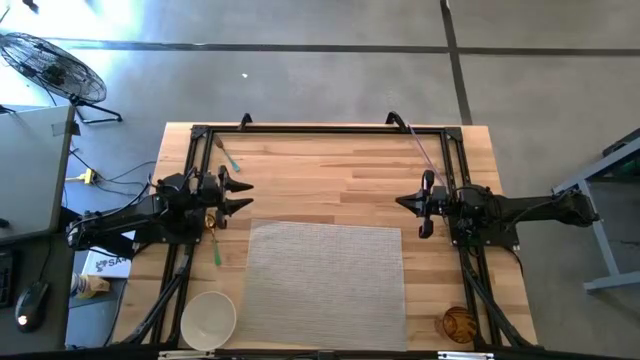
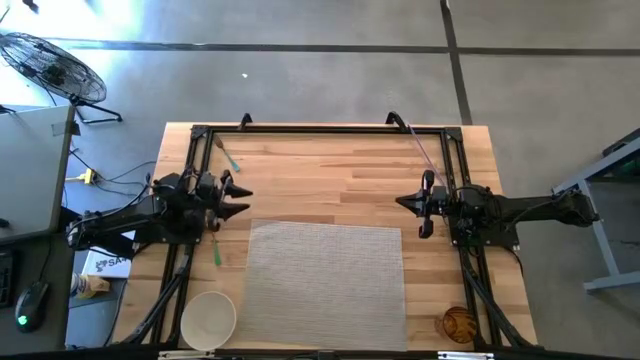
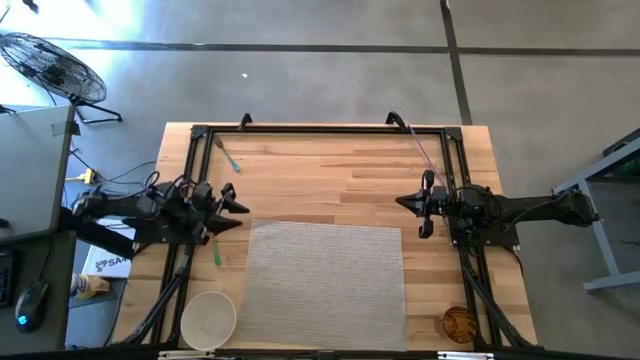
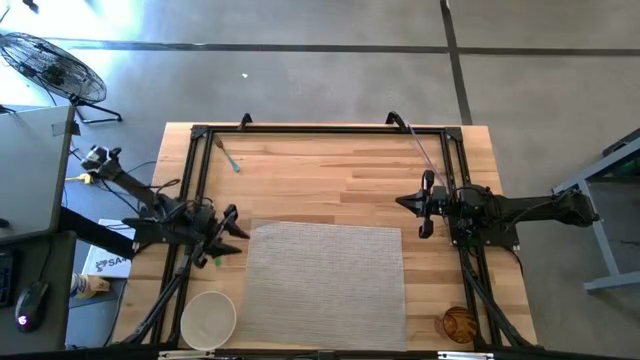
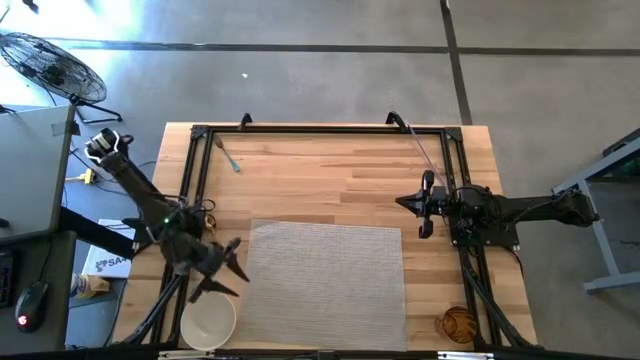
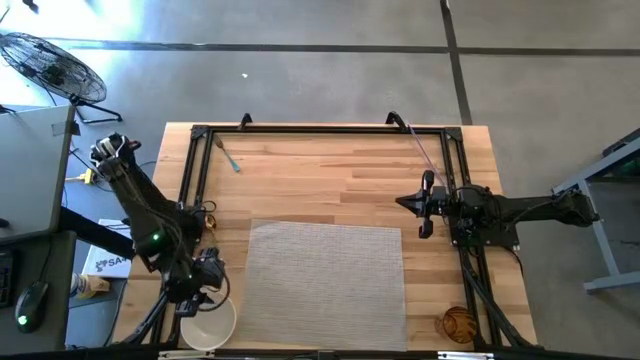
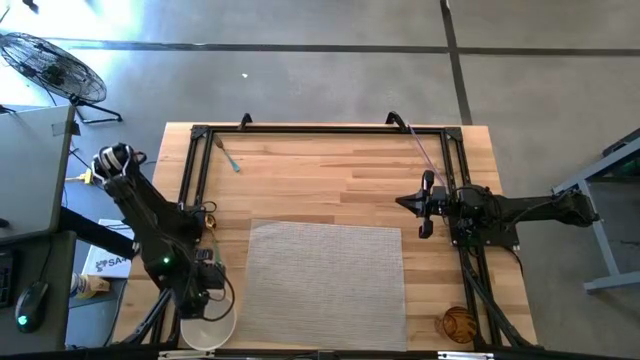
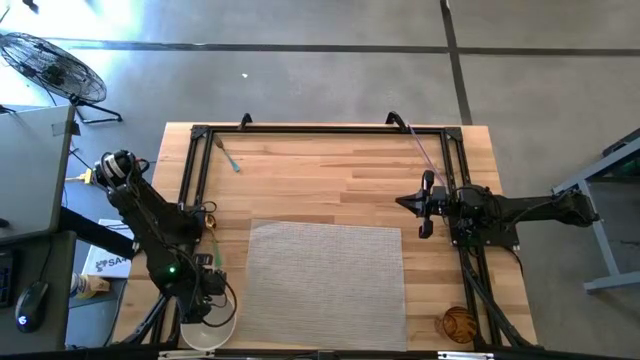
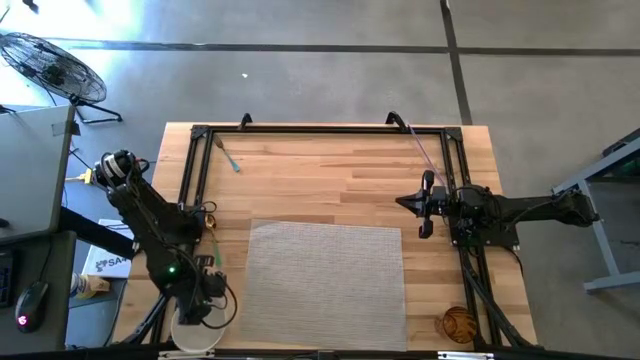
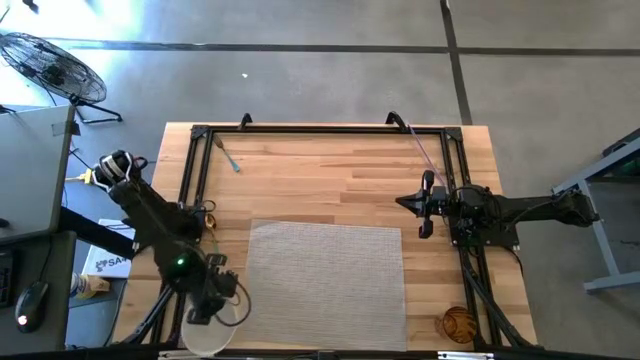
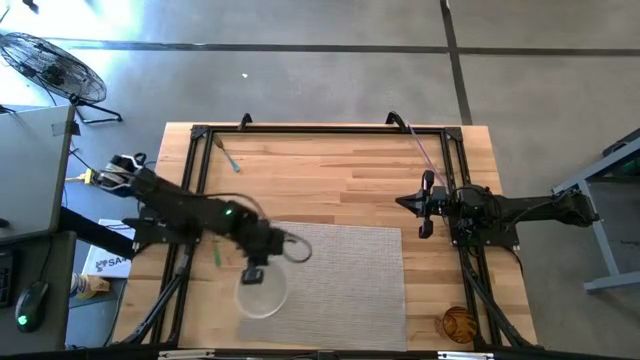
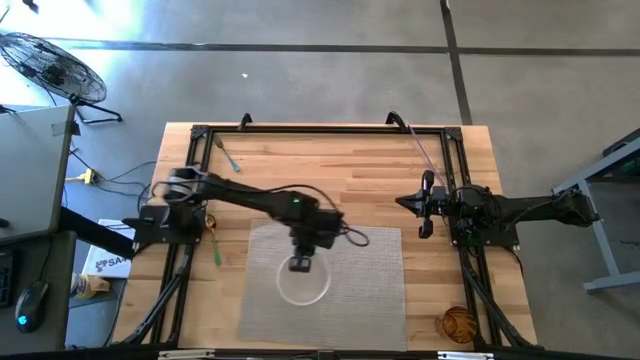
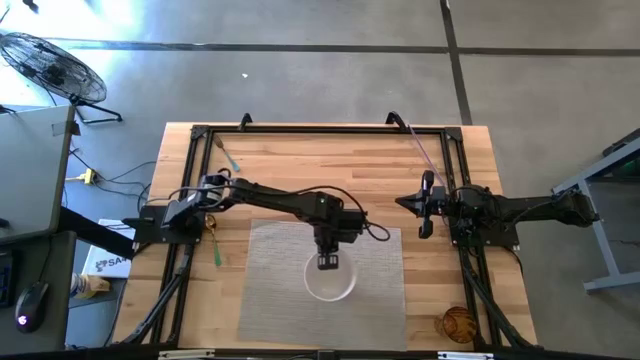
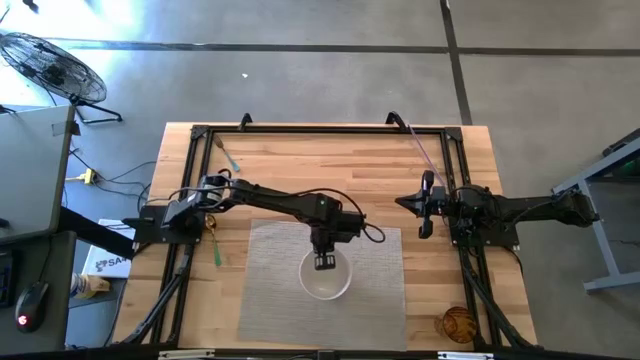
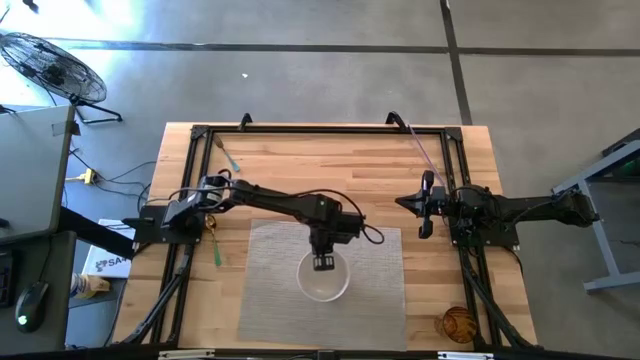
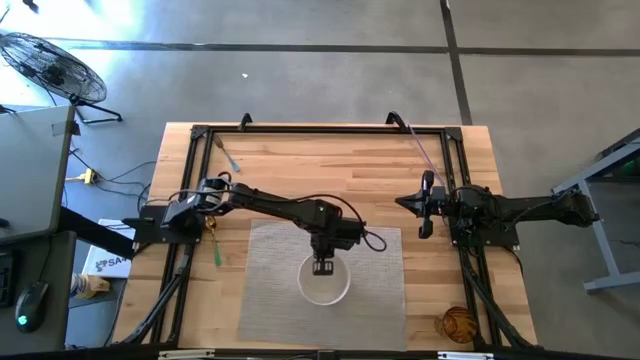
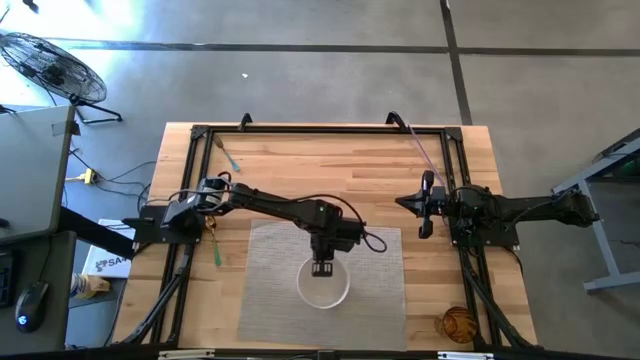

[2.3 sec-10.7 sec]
Task: Pick & Place Utensil
Put the white bowl on the gray mat

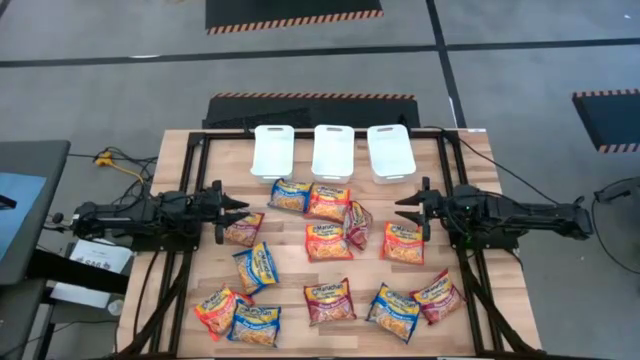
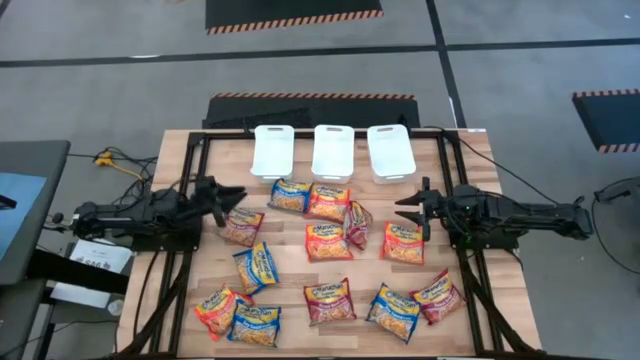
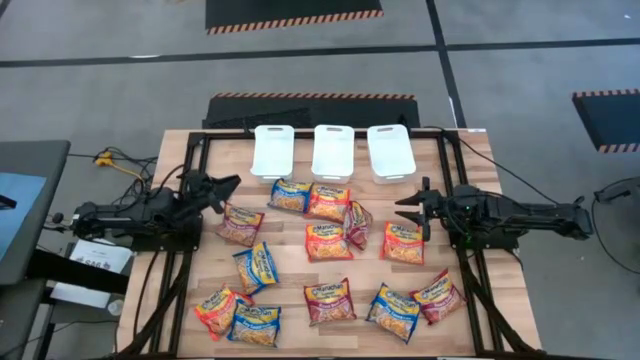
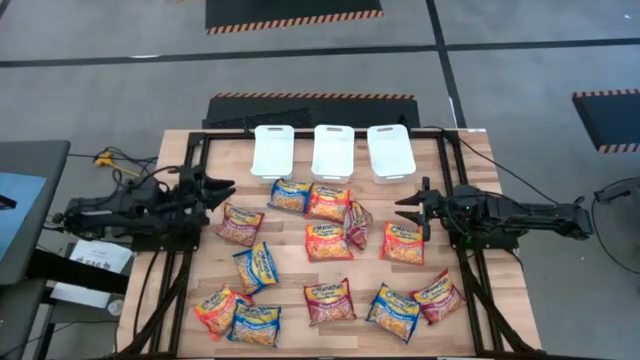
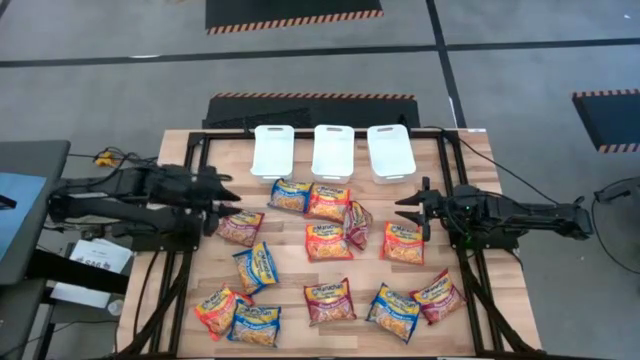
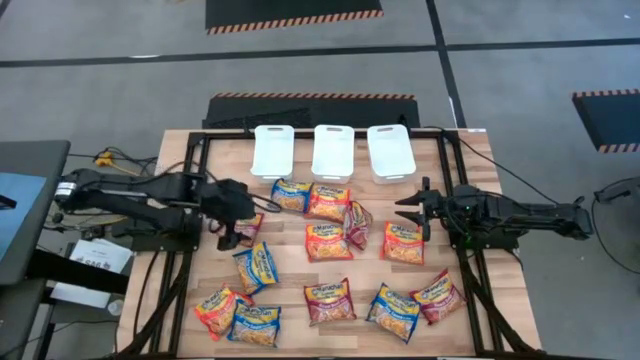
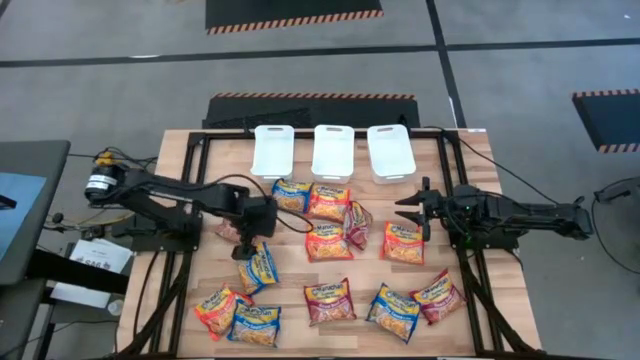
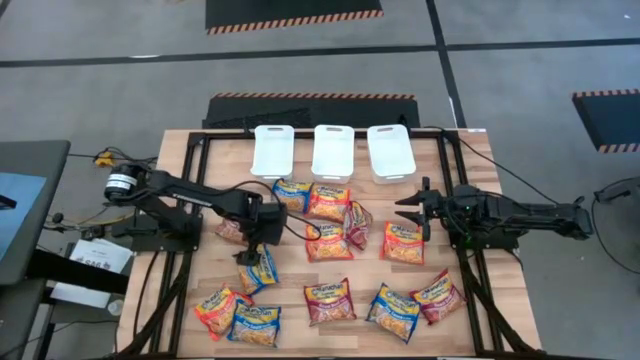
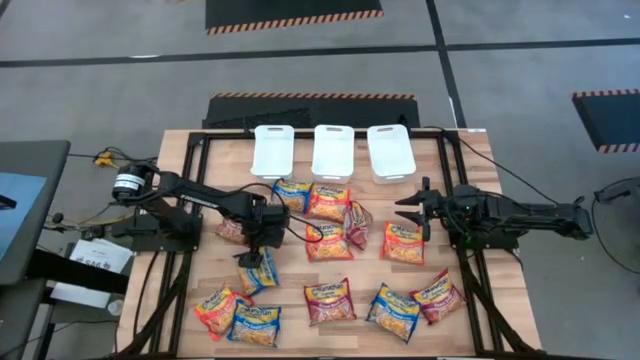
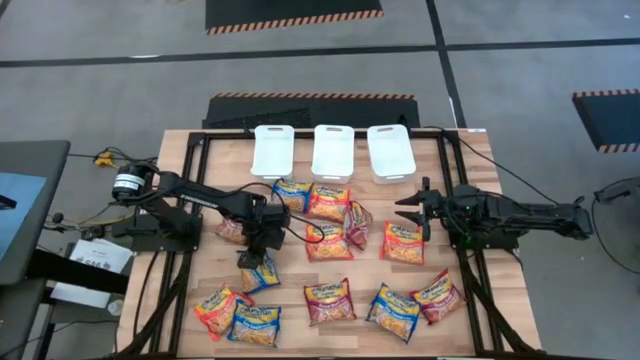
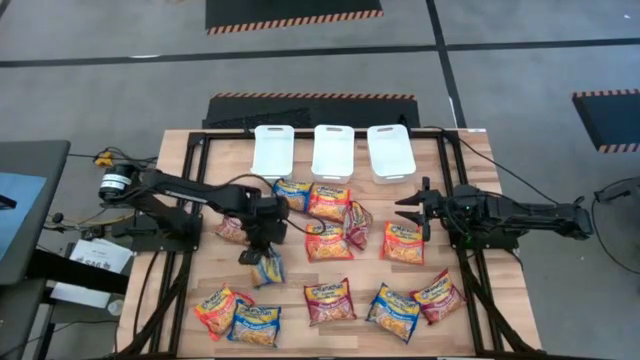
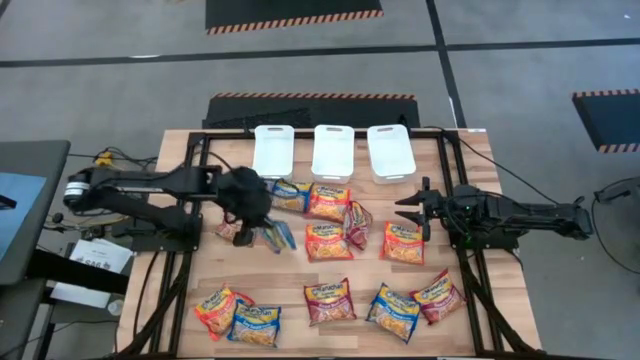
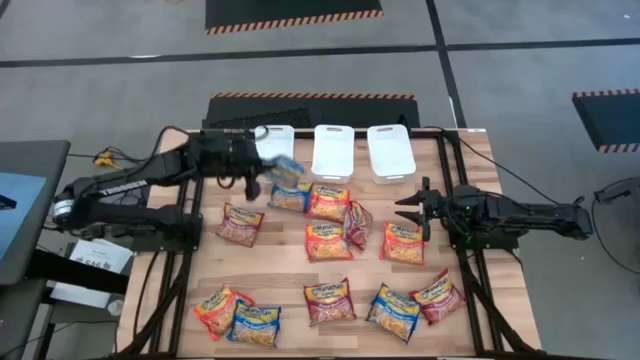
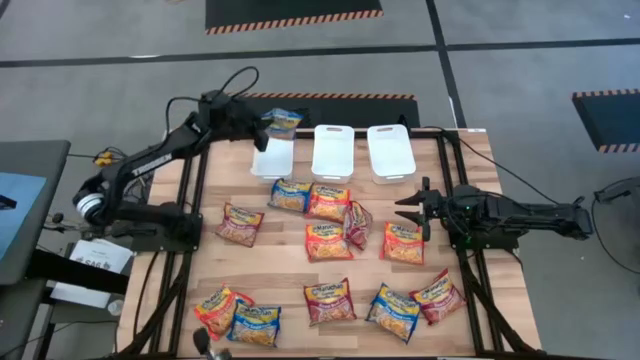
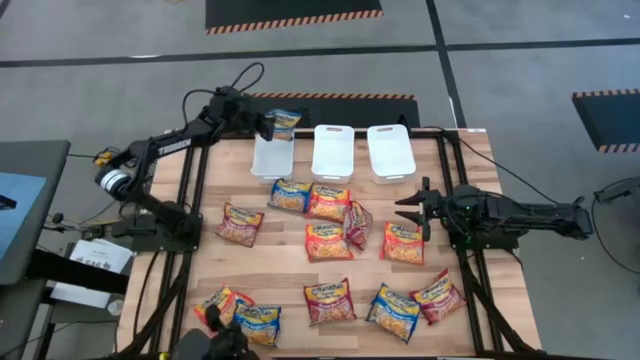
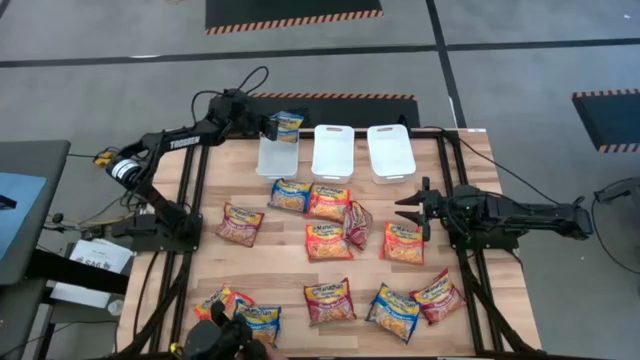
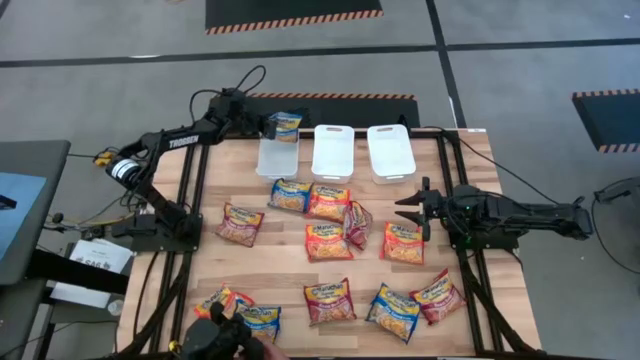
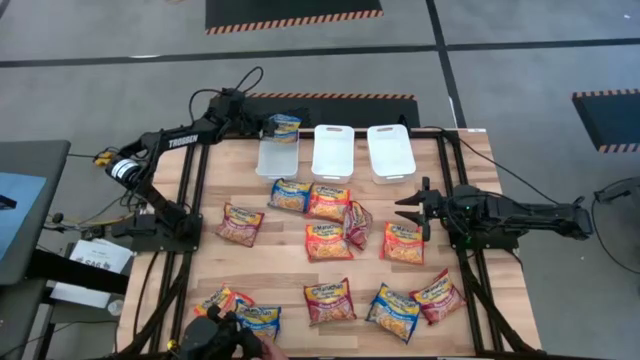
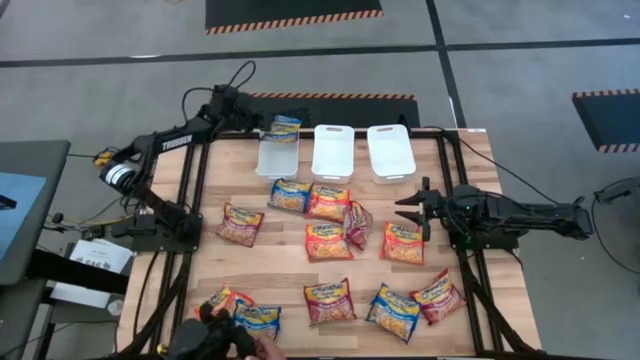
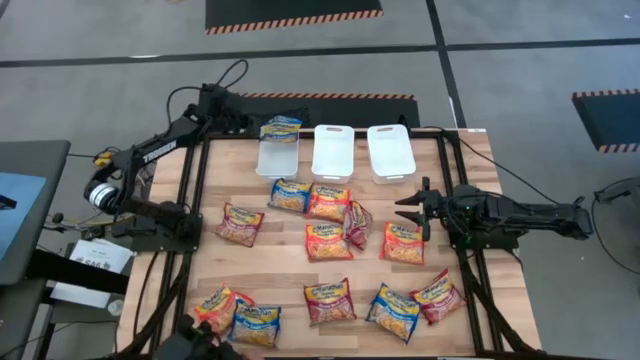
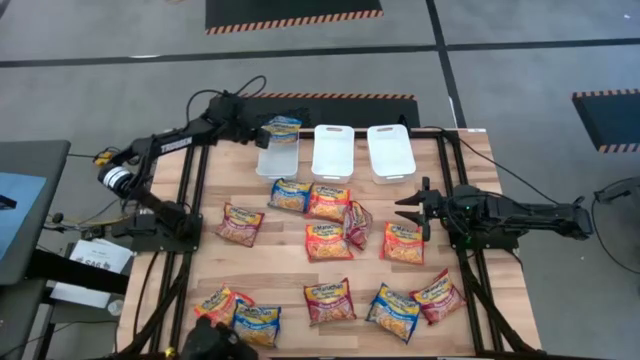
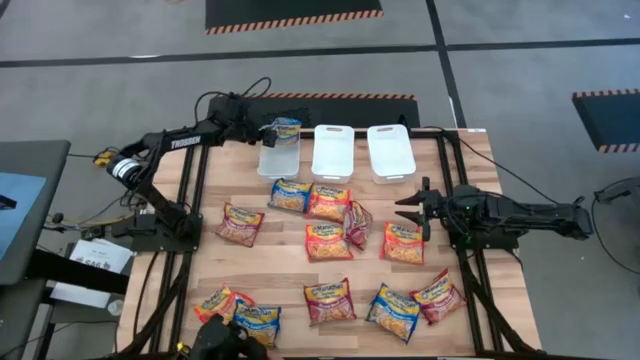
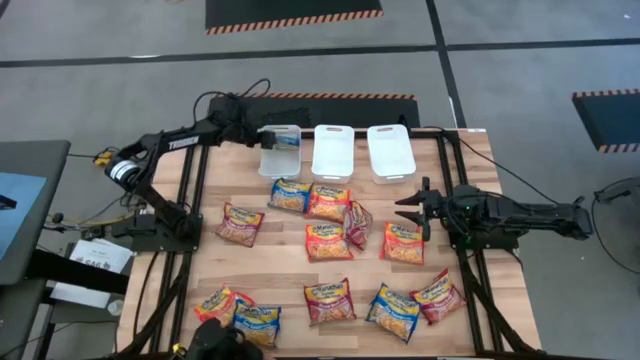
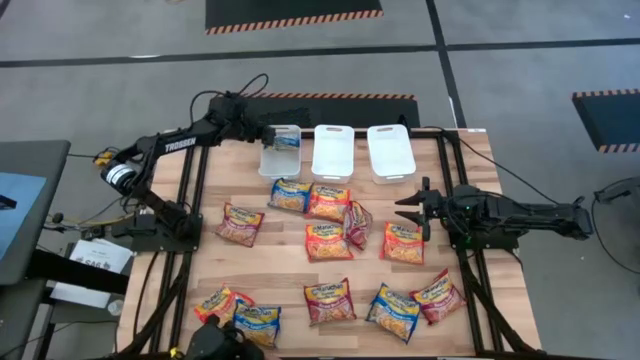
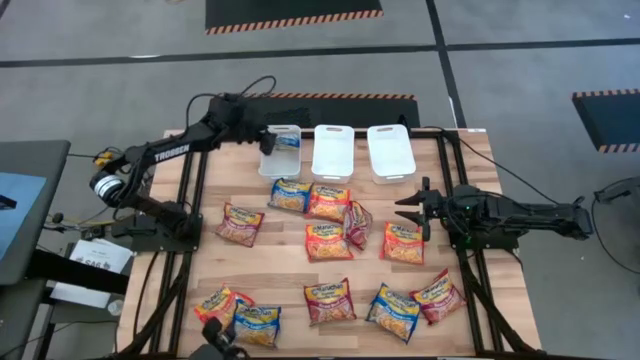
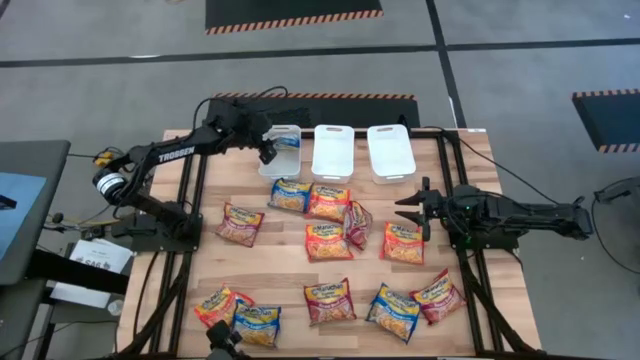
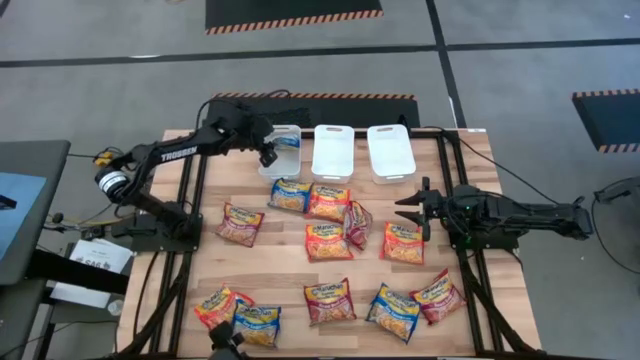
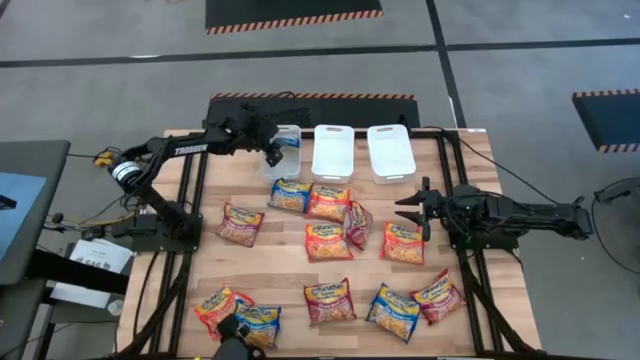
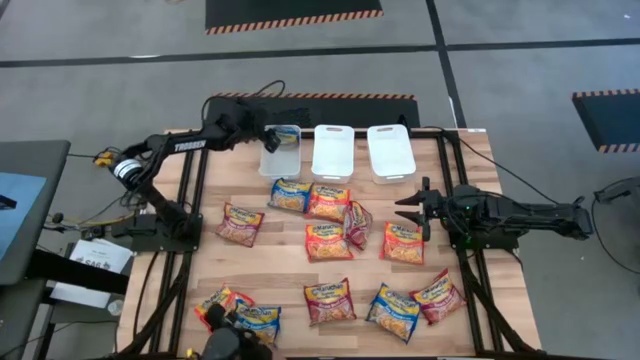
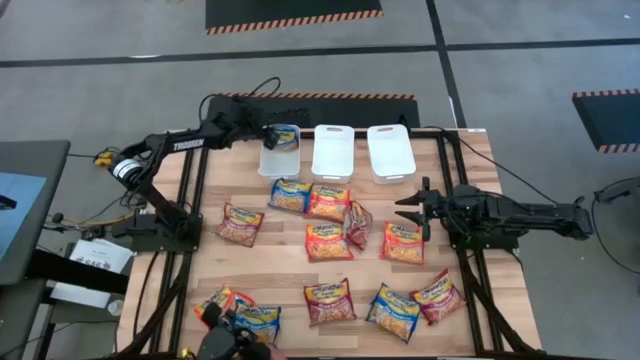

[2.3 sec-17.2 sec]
Task: Sort Maruchan noodles
Put the blue noodle pack into the left white bin
